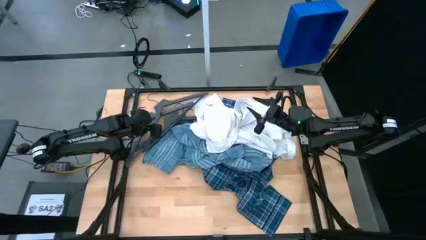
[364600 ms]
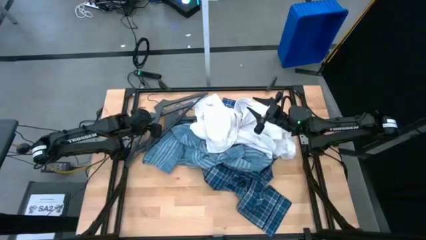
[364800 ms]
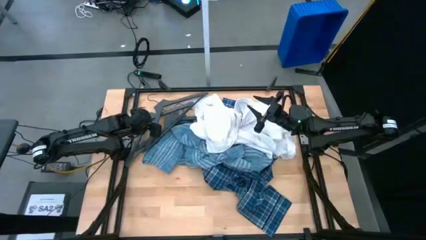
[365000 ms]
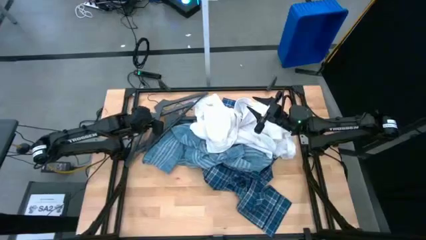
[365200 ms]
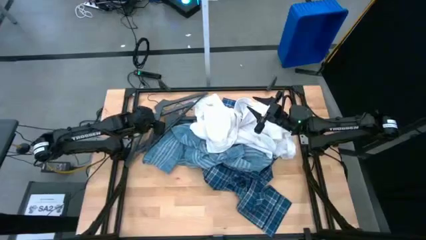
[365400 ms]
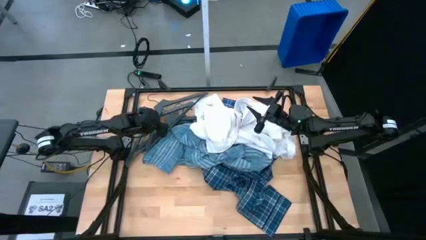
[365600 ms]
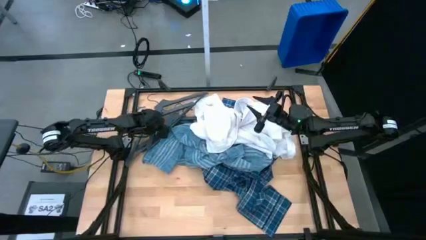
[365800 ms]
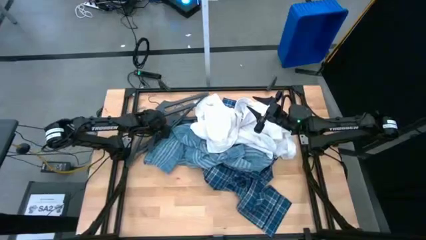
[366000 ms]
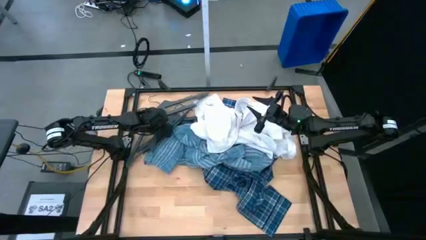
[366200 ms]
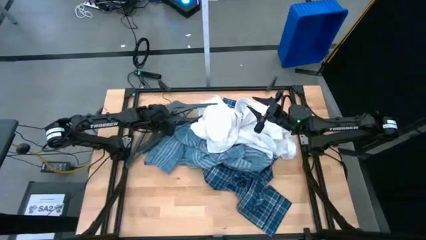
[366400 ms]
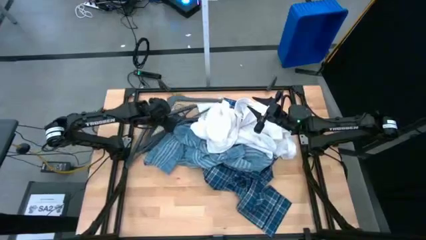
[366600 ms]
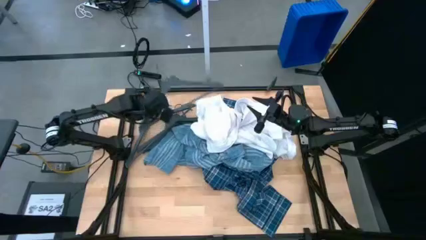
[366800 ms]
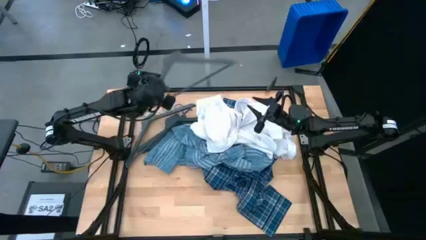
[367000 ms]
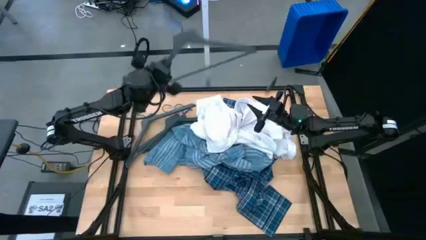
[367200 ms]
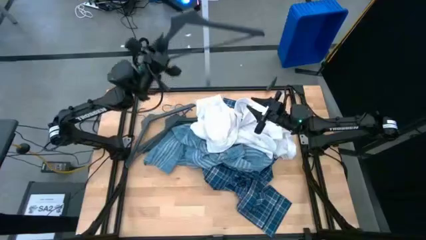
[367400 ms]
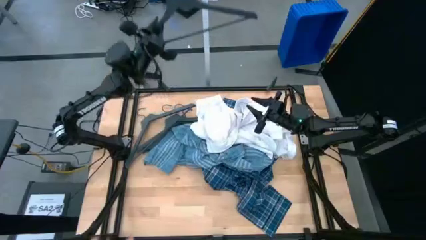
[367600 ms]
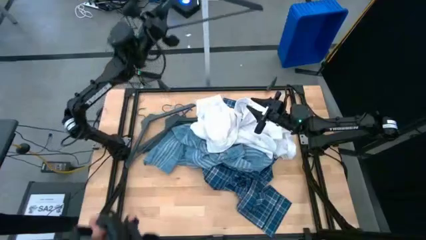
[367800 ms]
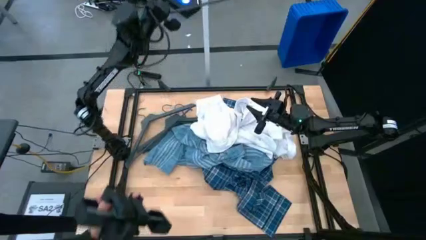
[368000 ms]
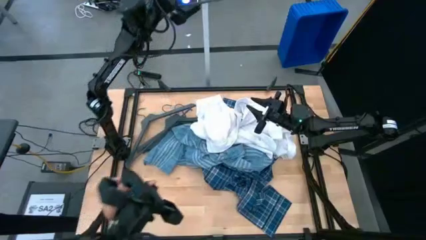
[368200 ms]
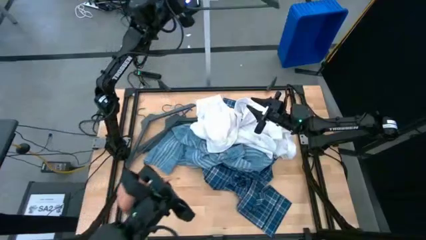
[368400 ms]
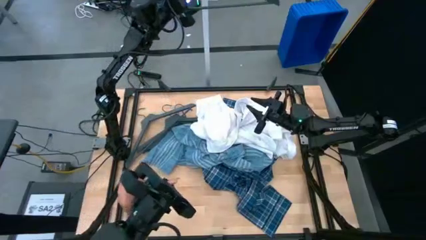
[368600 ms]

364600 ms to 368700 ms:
Task: Hang clothes
Hang the black hanger on the hanging rack

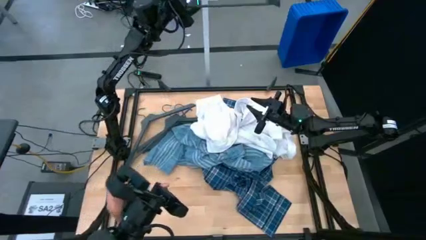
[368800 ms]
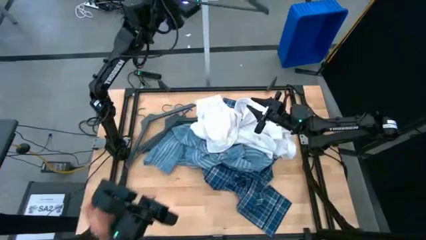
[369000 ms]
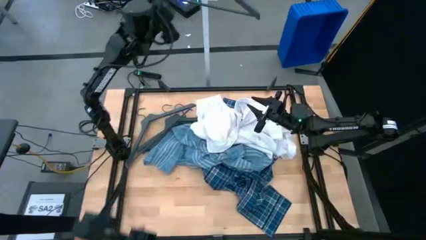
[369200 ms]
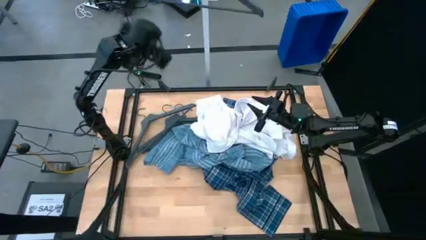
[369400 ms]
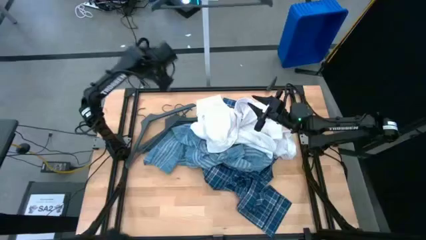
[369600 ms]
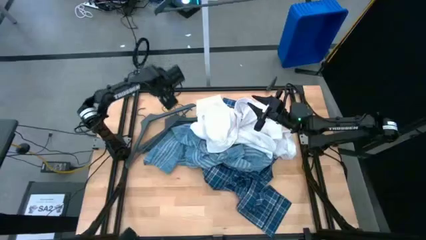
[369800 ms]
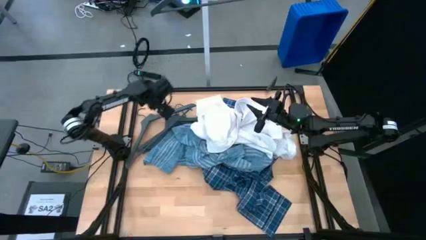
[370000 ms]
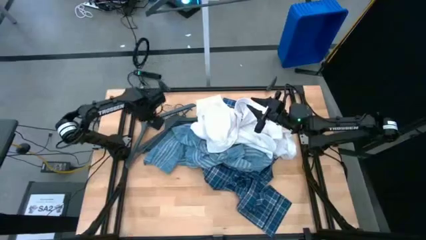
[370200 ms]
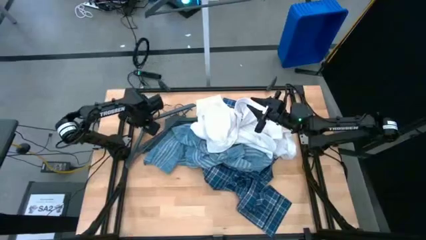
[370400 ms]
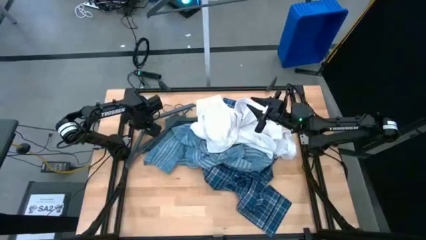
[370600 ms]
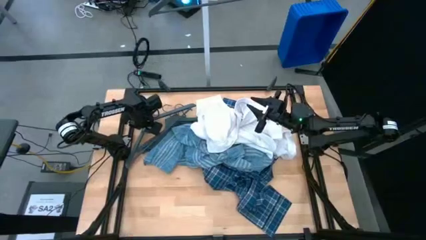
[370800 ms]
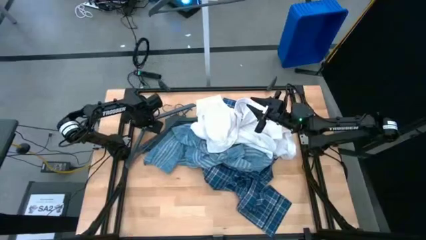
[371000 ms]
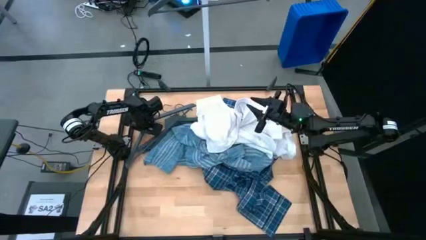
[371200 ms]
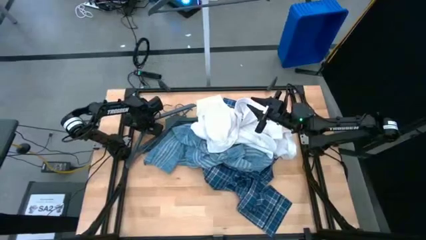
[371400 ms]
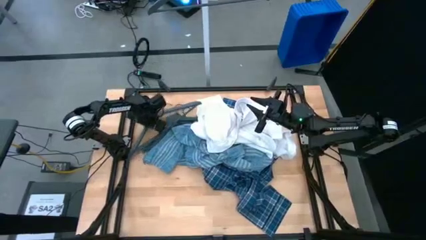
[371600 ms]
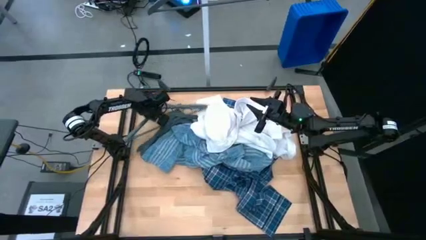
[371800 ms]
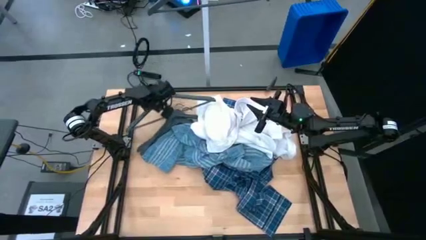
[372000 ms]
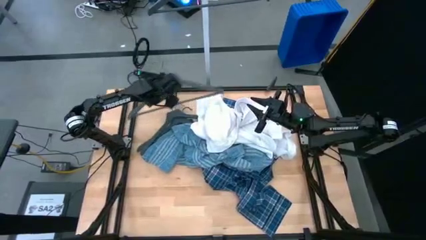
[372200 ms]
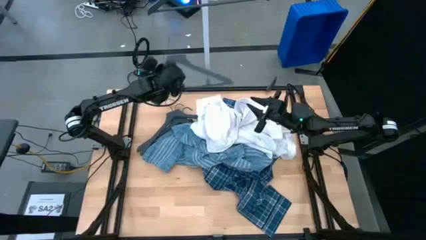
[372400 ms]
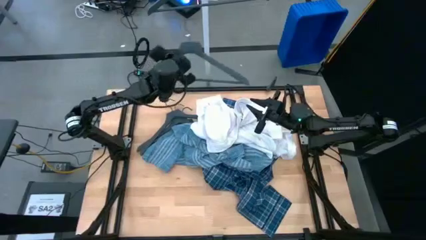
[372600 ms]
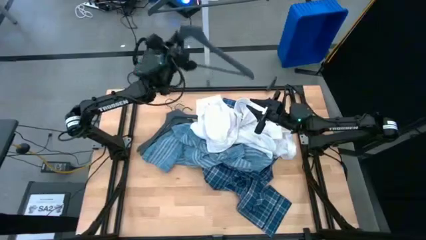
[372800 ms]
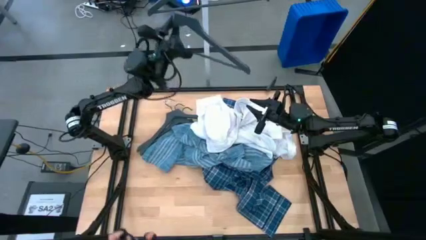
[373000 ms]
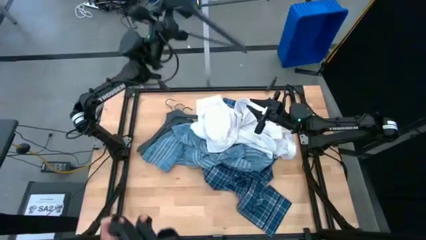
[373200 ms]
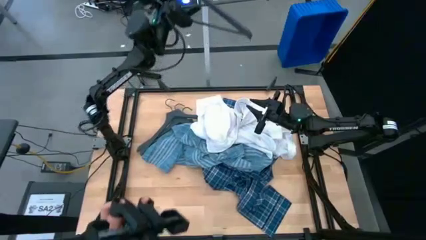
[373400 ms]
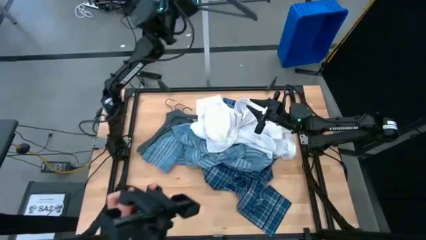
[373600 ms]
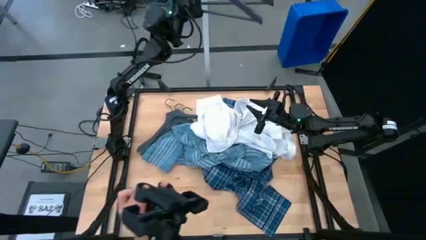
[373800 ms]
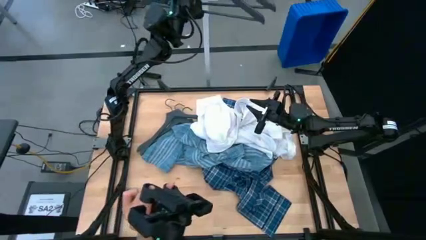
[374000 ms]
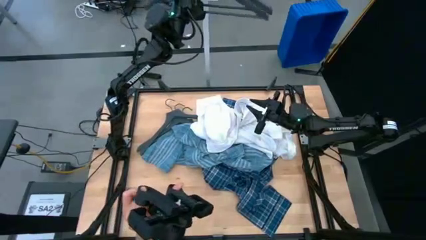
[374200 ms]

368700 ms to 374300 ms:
Hang the black hanger on the hanging rack

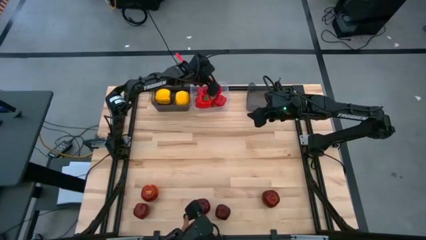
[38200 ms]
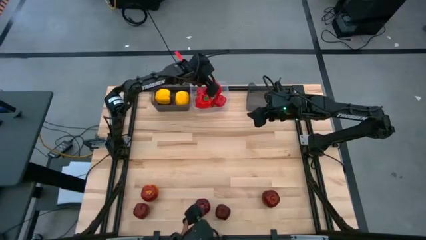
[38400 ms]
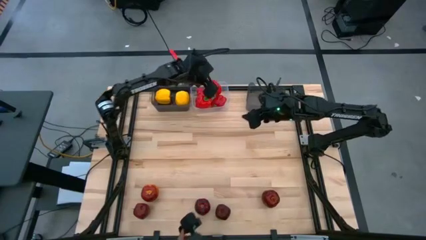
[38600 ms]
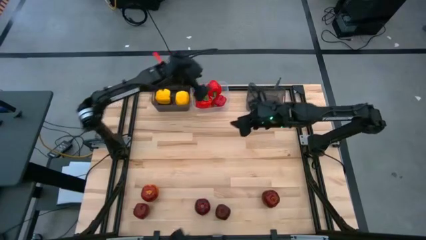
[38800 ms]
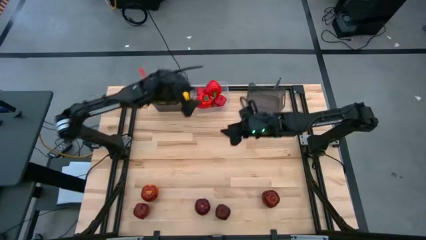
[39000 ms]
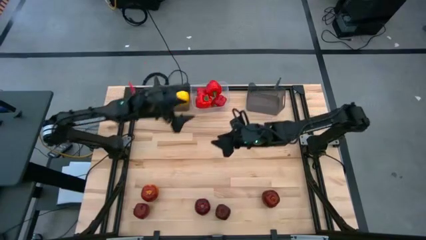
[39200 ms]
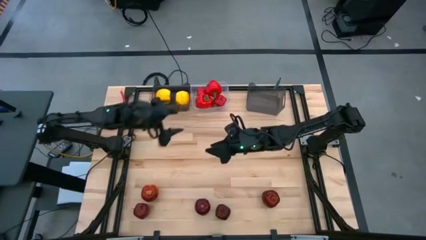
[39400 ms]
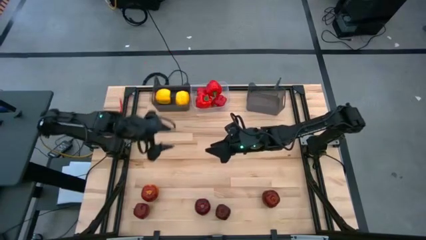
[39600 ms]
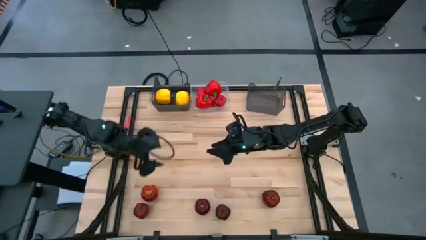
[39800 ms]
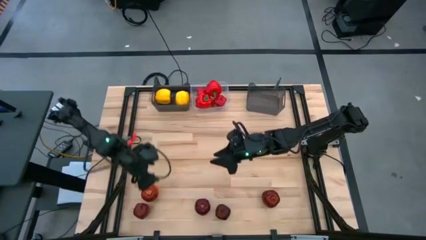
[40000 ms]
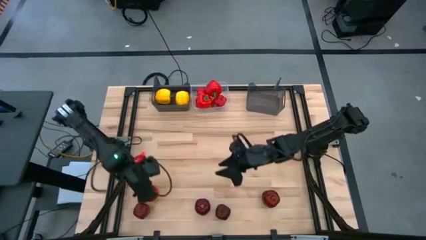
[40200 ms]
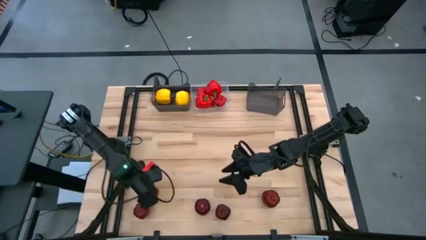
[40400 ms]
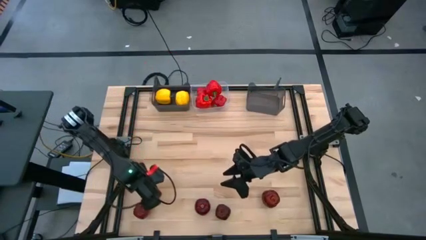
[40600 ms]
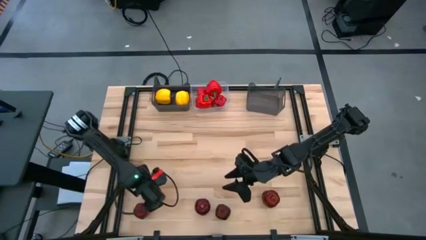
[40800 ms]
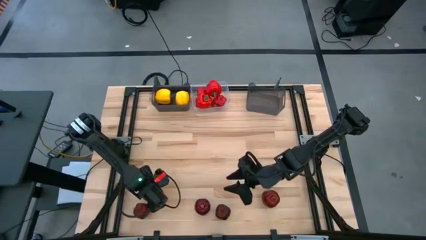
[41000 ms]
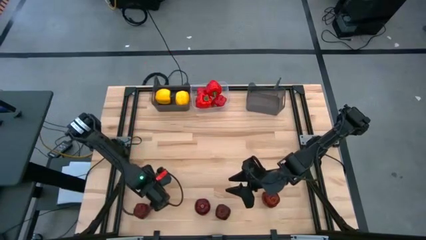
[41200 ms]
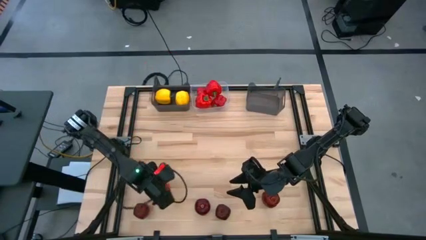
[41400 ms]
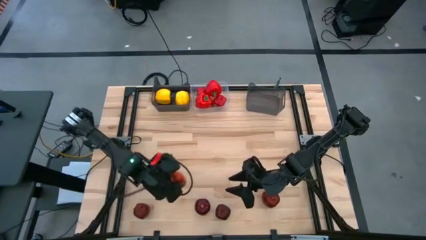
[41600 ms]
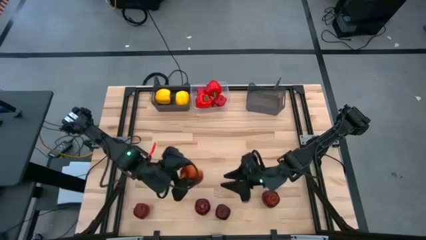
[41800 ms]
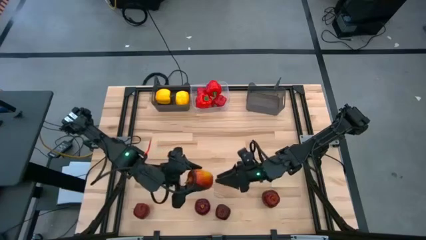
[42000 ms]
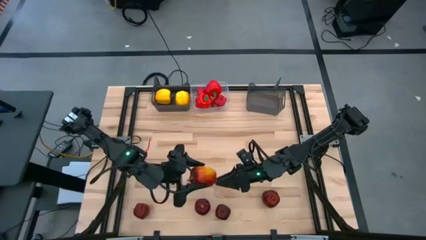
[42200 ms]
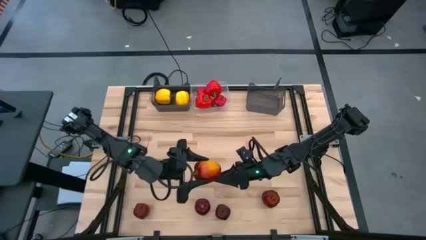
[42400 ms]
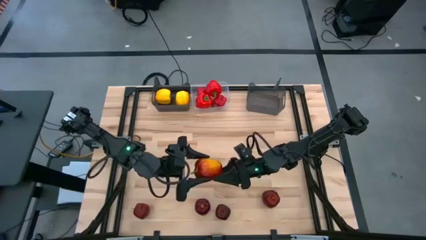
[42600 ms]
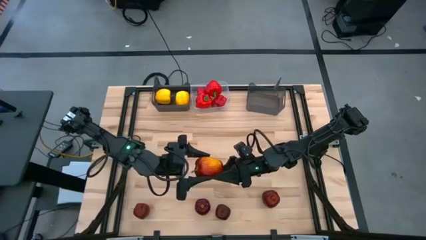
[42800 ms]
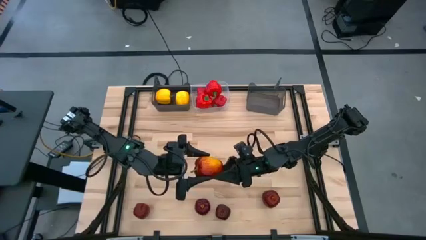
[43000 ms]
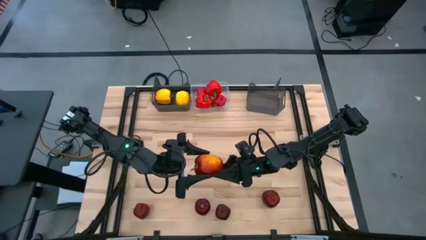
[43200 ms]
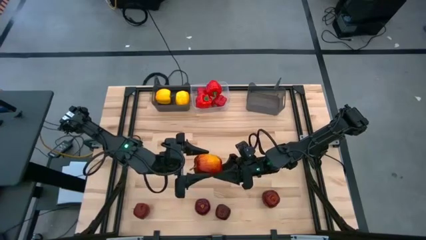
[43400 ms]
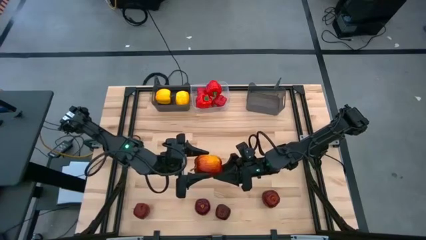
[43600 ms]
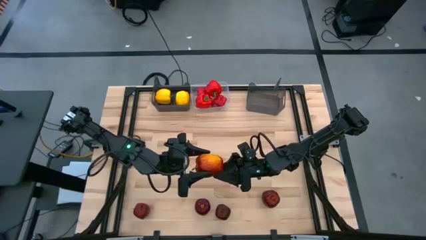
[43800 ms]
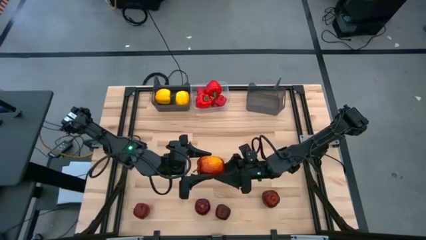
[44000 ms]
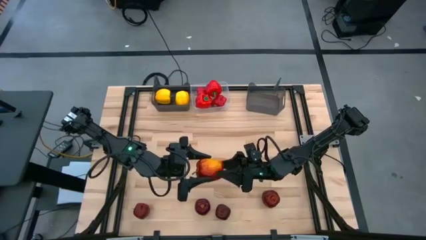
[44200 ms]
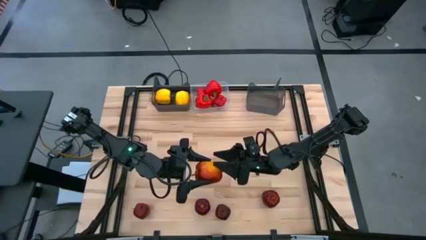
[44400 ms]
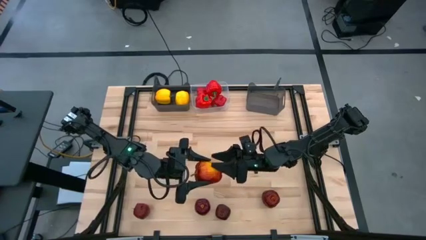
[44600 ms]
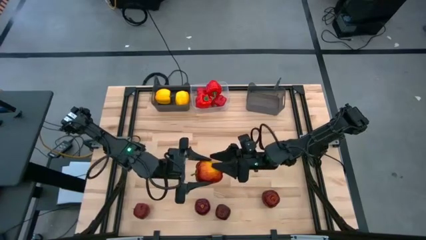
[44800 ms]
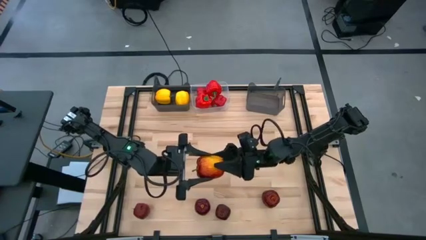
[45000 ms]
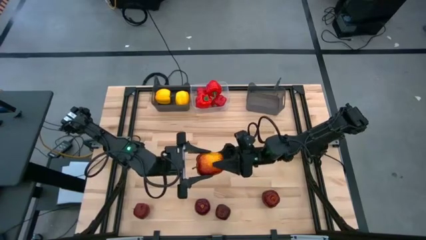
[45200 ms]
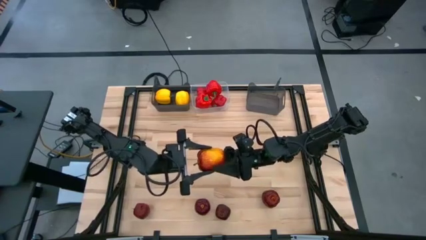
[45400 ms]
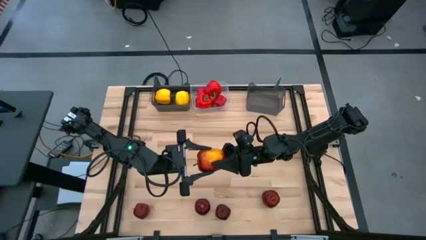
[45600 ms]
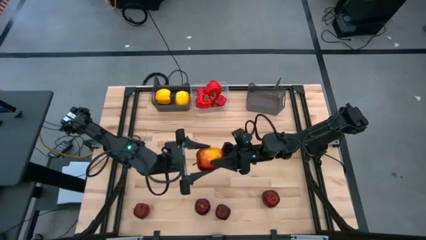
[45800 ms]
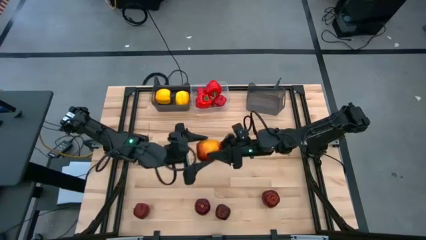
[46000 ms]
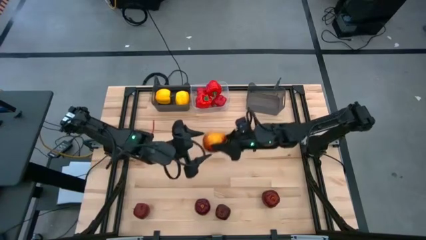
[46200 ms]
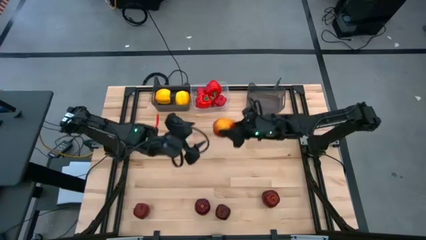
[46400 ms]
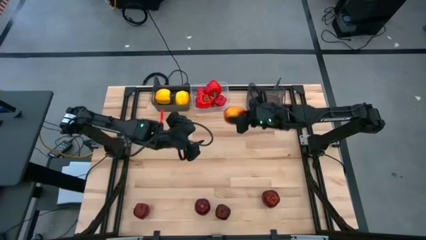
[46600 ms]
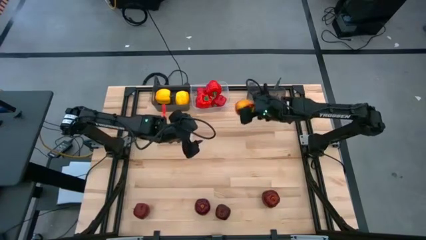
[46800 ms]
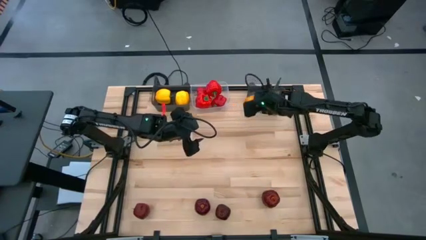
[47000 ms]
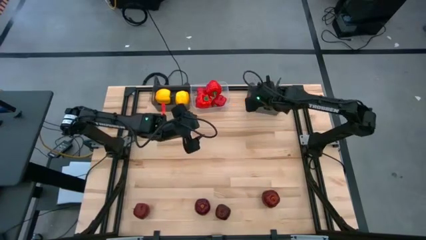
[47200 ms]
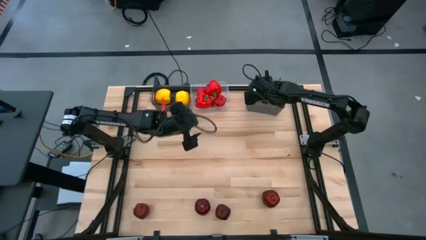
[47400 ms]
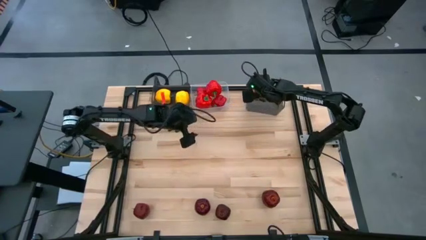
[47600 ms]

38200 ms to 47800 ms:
Task: Sort produce into baskets
Put the yellow-red apple into the right black bin
